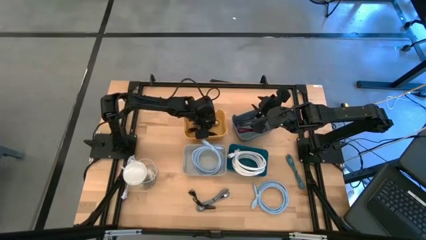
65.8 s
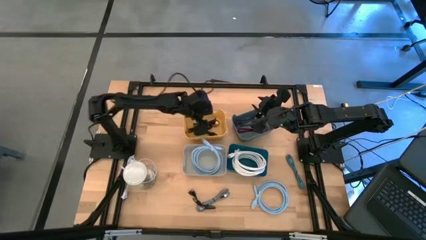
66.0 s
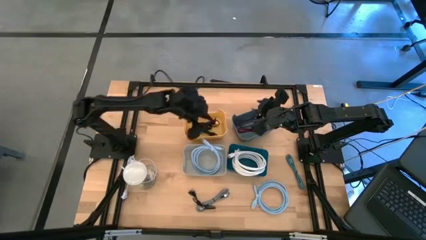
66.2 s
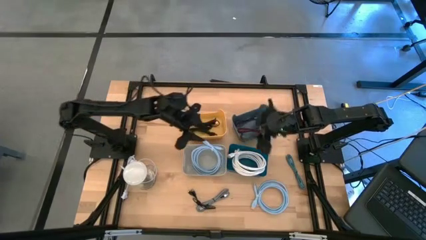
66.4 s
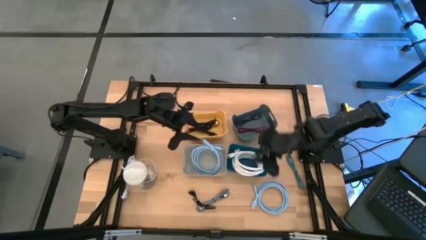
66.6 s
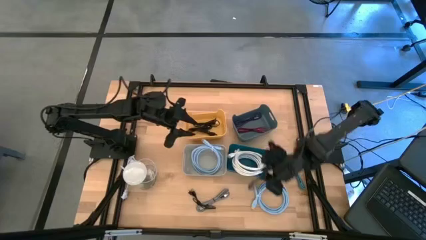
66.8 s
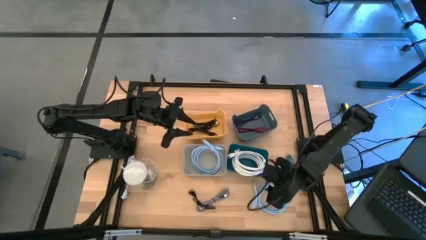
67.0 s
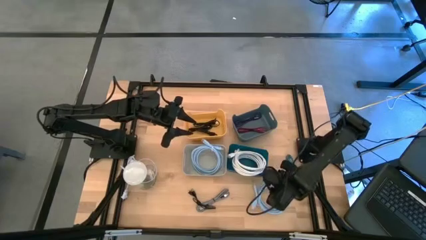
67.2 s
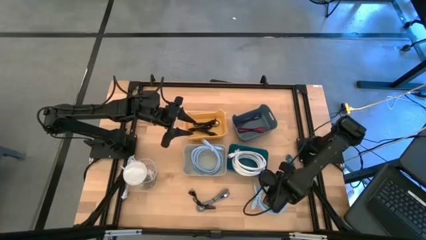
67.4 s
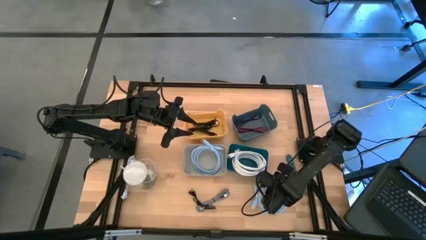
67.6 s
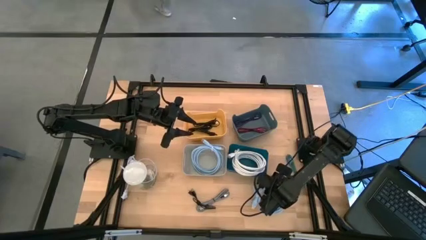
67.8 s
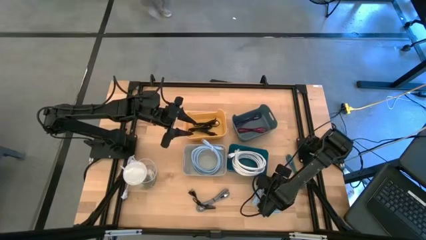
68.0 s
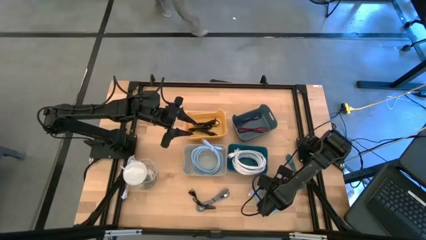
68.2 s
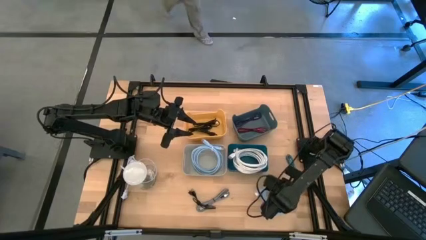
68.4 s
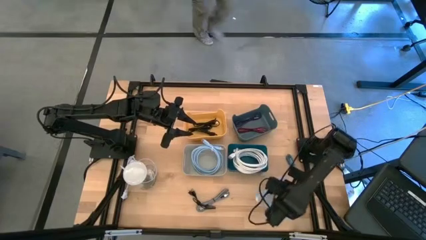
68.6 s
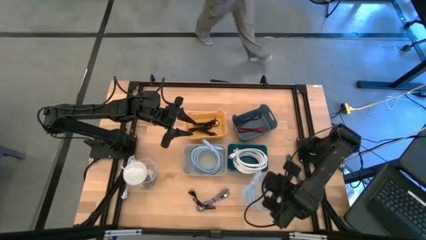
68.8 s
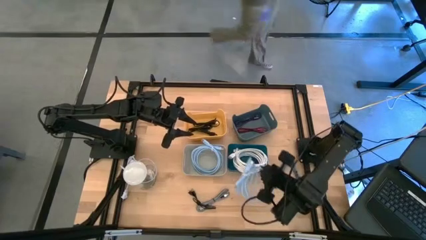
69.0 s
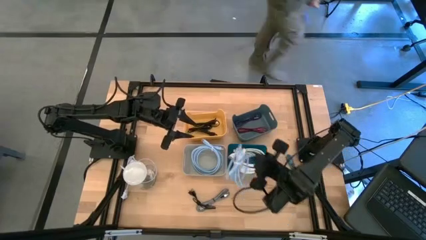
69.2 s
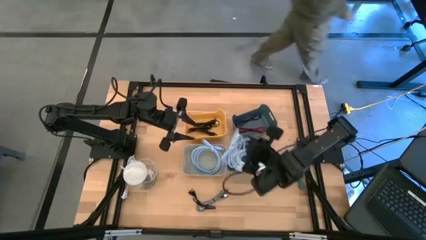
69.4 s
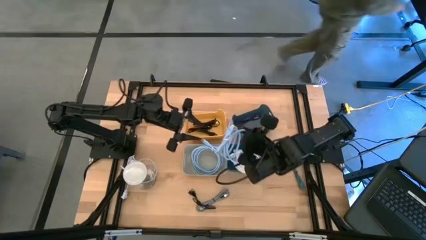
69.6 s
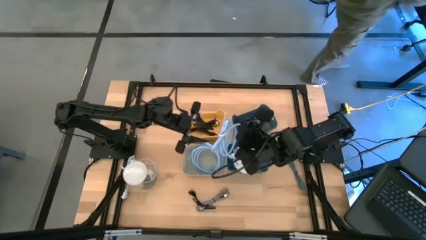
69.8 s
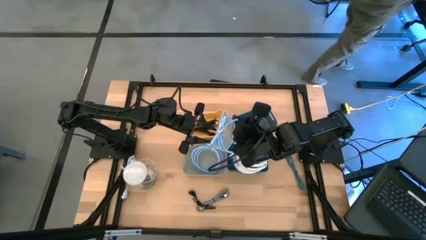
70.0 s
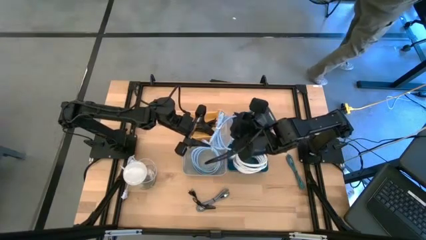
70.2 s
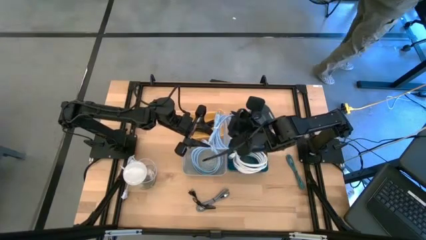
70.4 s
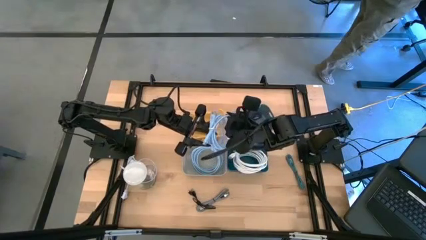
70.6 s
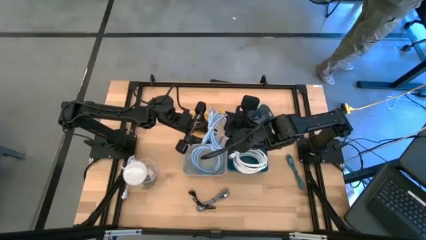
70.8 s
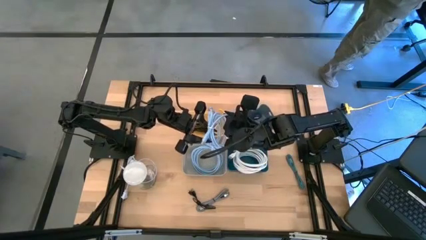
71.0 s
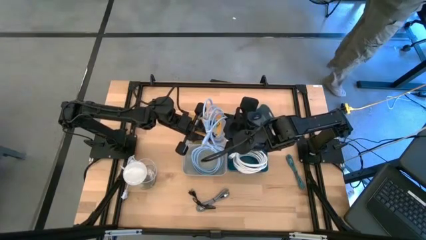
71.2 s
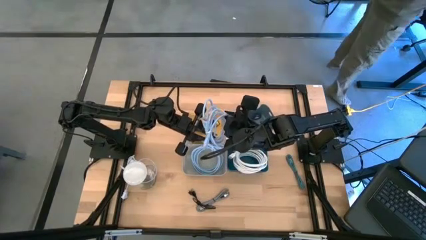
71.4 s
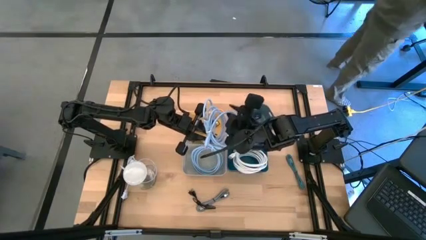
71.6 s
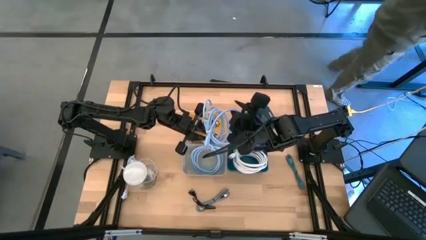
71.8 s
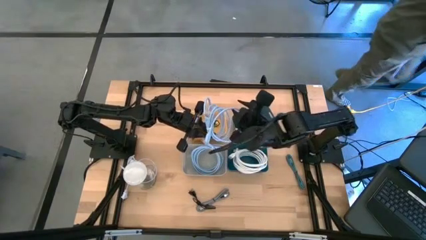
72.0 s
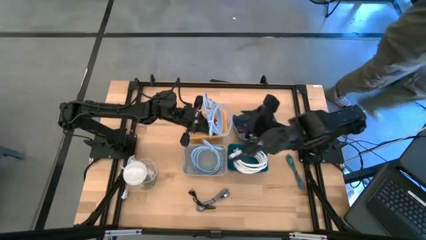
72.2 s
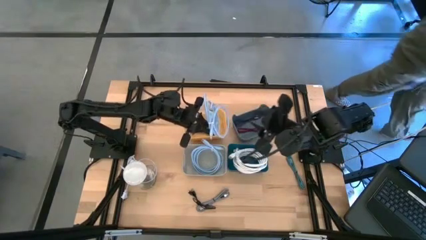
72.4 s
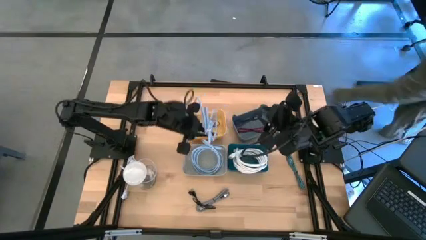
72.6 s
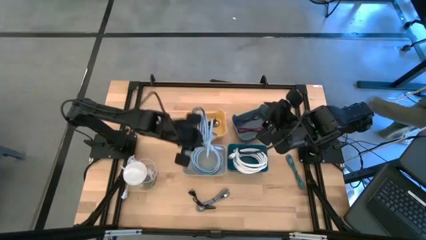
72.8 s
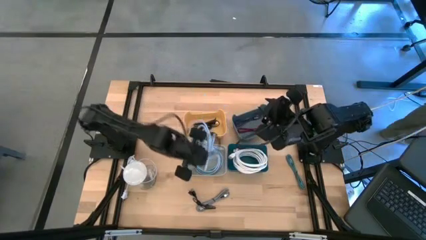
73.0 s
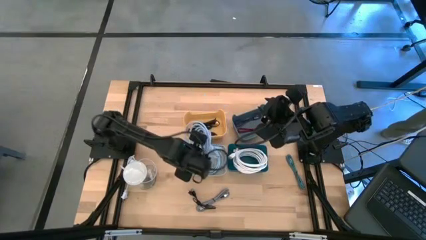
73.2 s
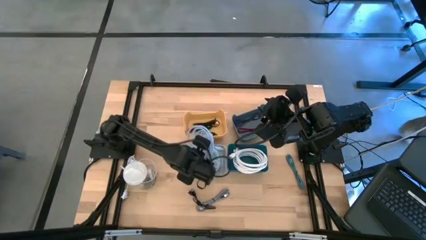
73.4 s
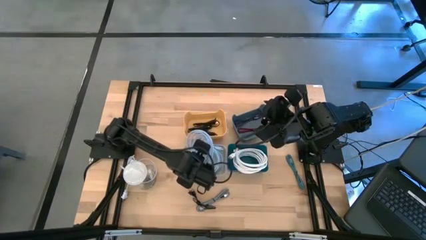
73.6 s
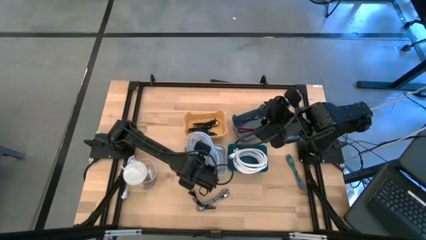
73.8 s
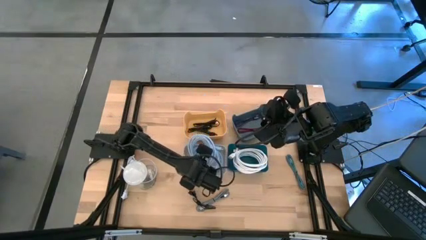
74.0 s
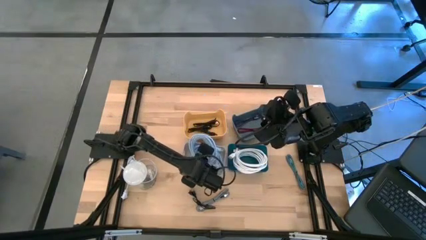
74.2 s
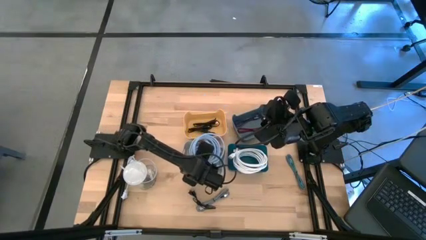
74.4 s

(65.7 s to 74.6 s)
Task: Pick & Place USB Port
Put the light blue USB cable into the gray bin

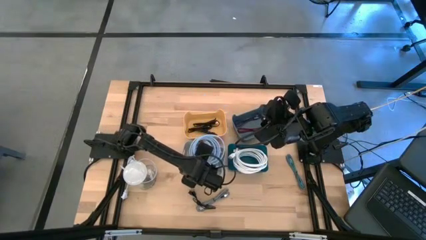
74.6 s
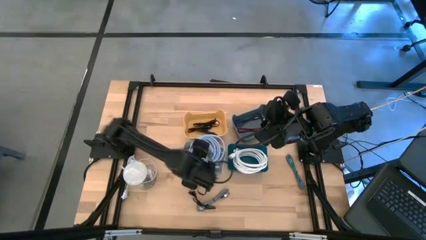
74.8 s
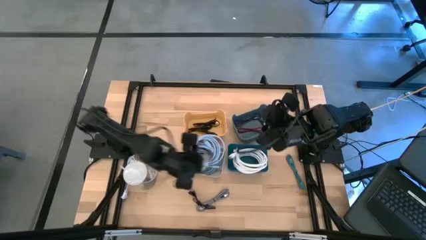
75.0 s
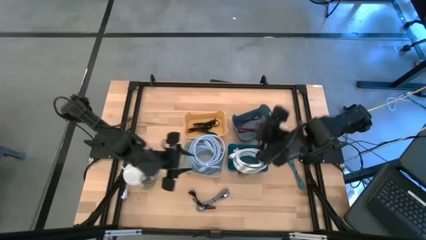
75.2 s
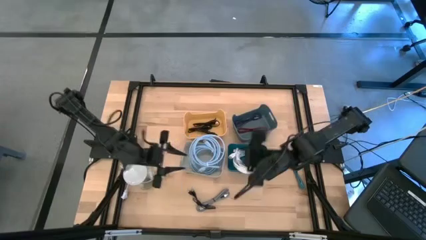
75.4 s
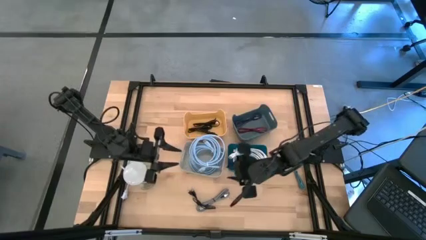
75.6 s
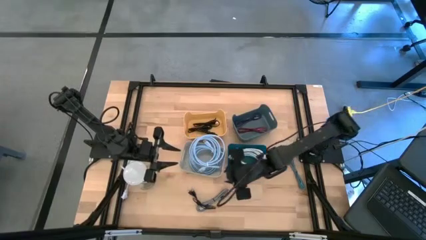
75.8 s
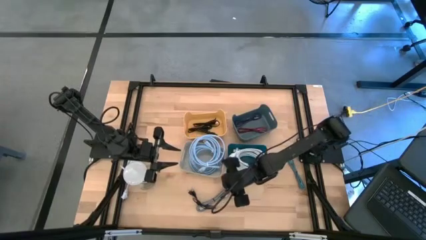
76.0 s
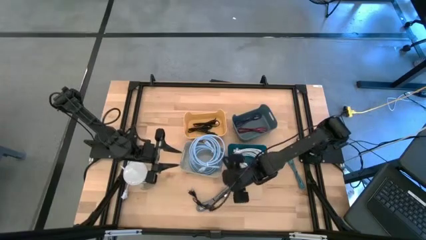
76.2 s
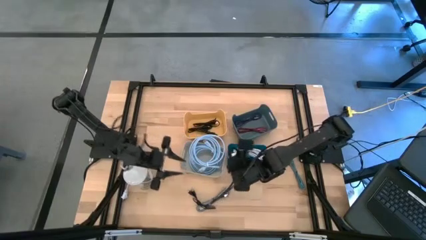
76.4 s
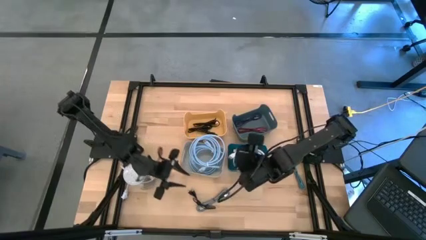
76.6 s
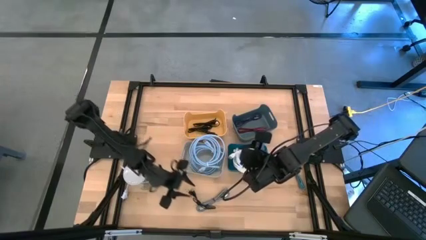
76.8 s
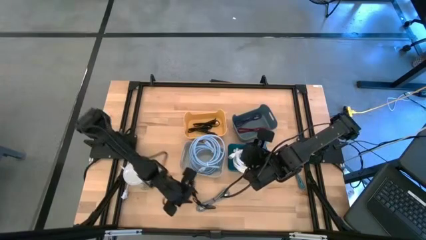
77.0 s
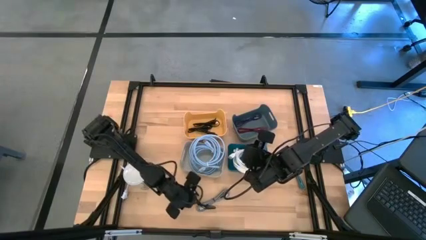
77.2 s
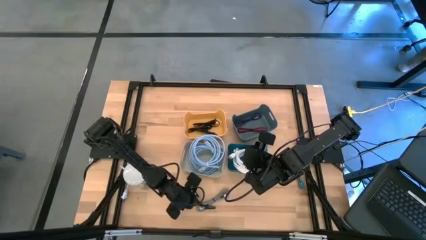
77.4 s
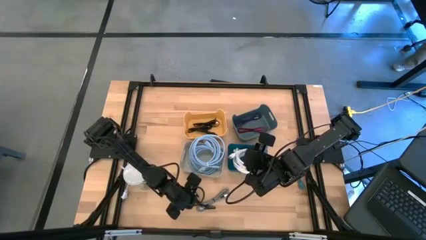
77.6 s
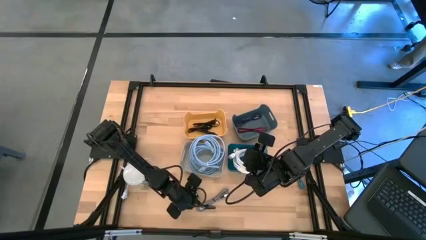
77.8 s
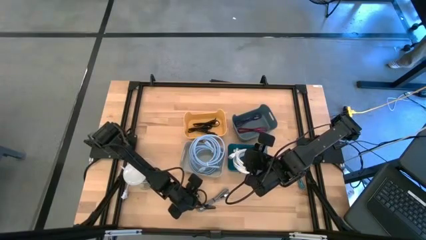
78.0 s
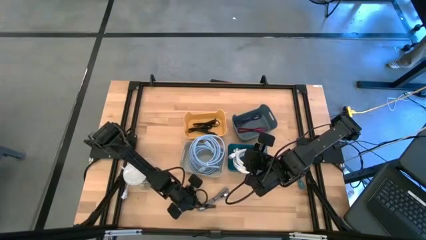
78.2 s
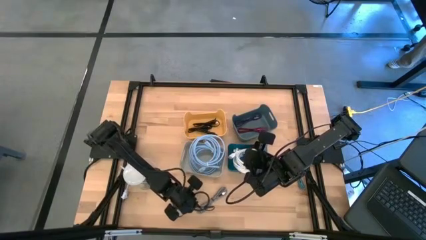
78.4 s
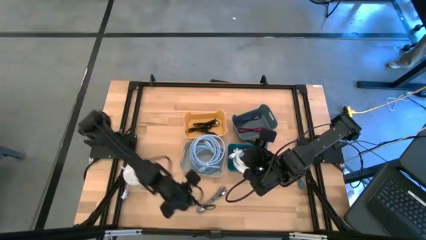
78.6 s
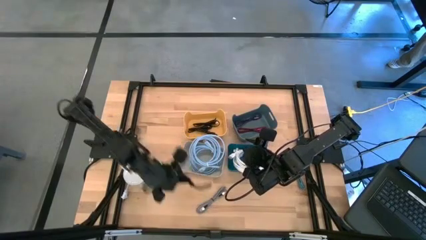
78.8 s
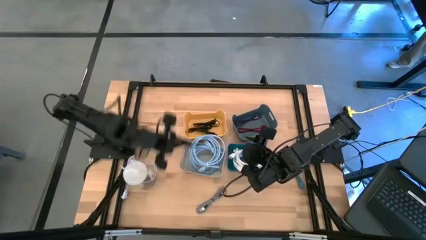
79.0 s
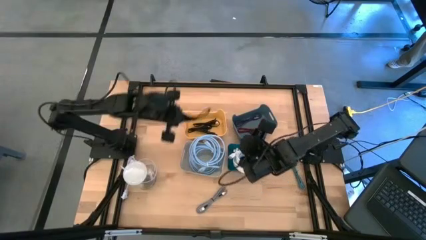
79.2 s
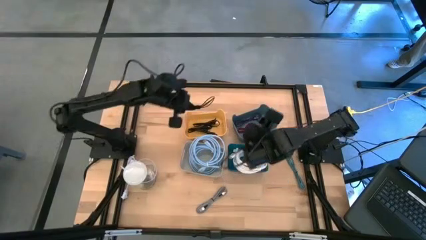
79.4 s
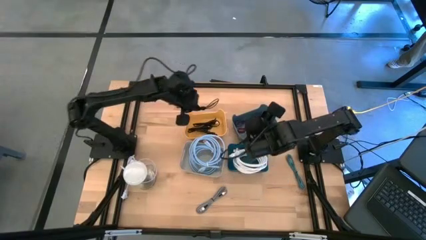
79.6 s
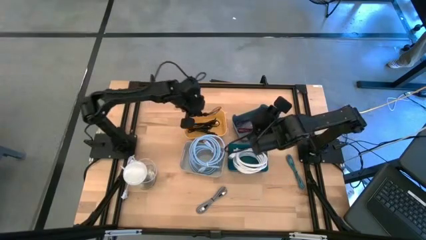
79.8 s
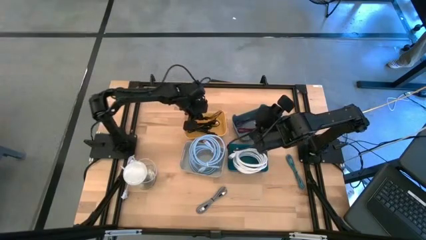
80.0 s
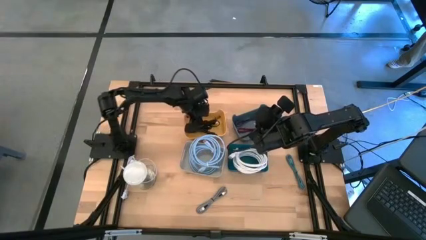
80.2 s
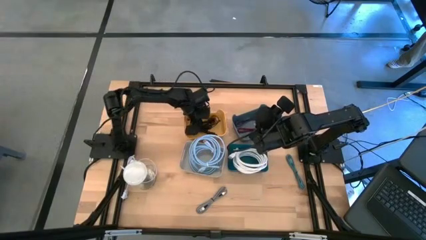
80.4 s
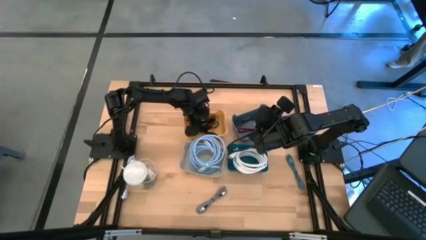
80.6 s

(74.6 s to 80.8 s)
Put the black USB cable into the yellow bin

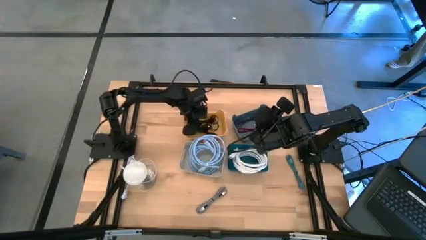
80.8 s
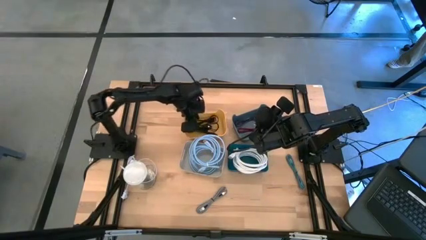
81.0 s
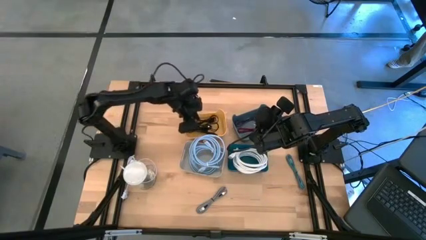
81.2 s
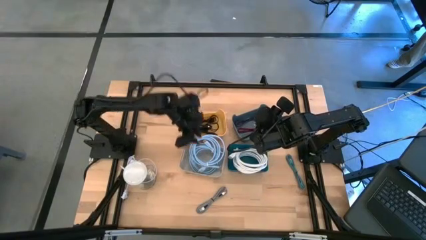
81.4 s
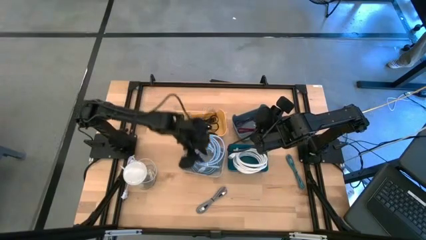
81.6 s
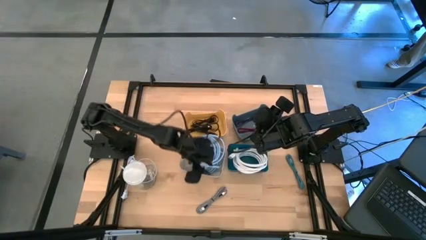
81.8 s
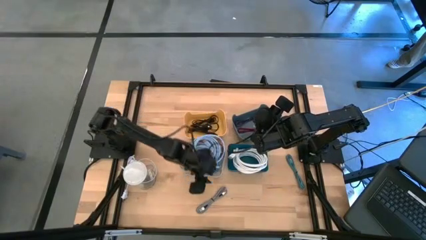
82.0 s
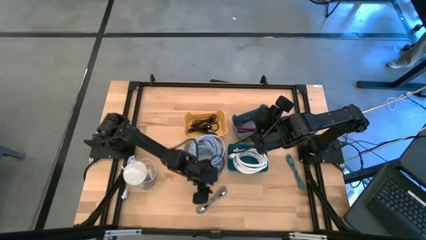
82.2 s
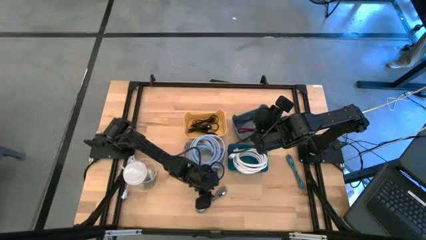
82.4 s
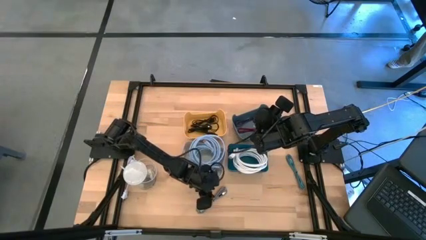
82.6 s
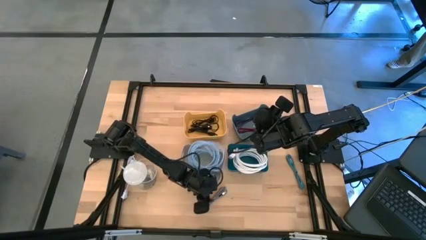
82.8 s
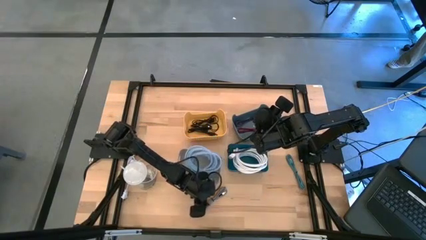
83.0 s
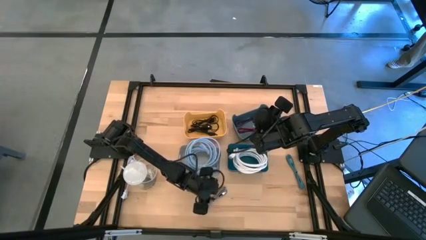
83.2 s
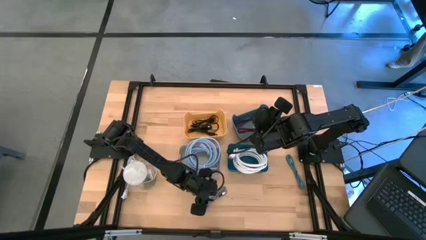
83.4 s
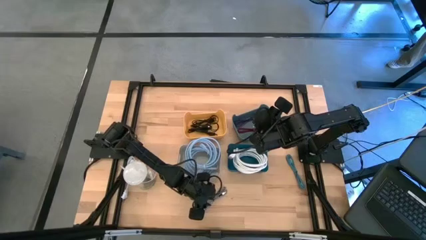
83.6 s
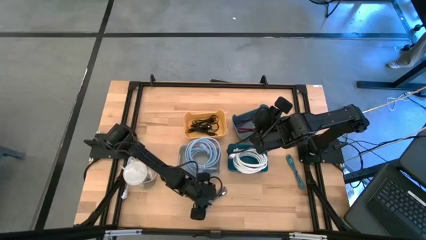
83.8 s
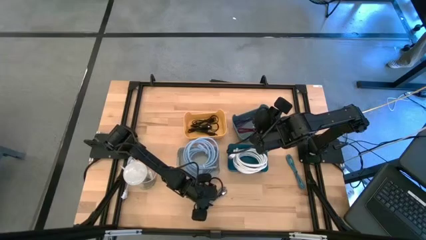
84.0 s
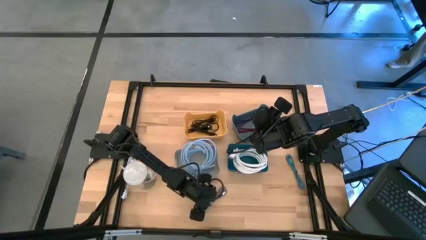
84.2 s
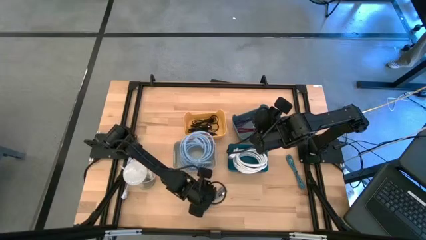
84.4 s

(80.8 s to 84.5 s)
Put the patterned white USB cable into the green bin
